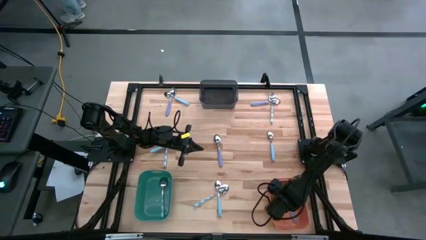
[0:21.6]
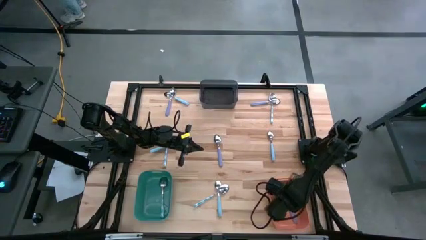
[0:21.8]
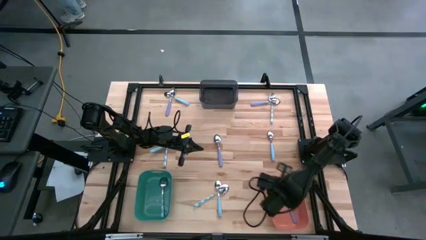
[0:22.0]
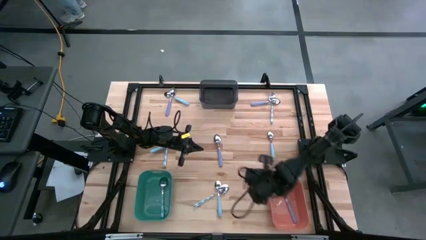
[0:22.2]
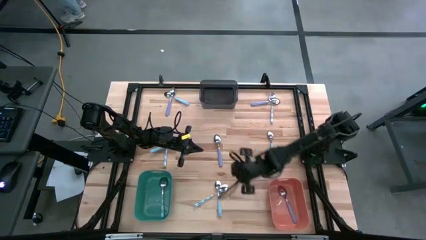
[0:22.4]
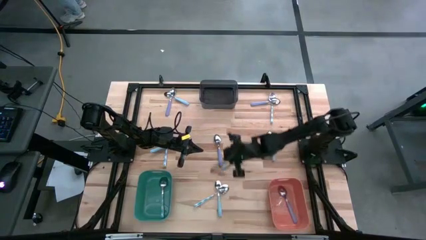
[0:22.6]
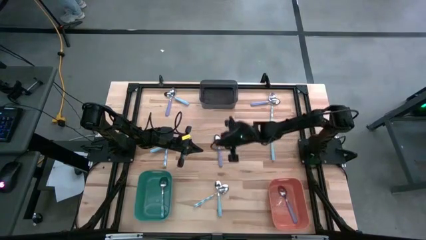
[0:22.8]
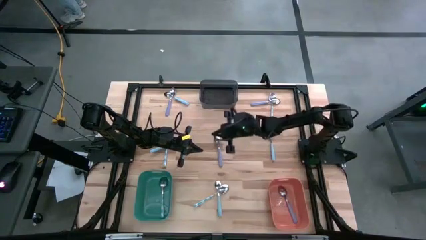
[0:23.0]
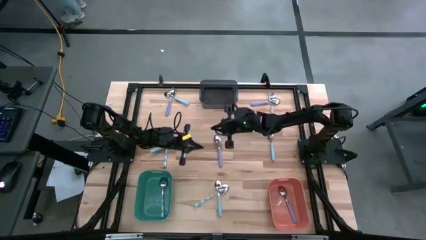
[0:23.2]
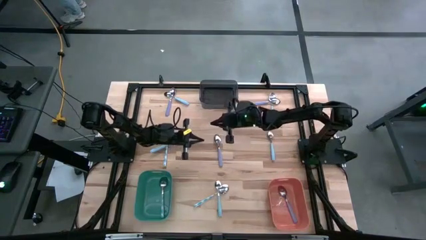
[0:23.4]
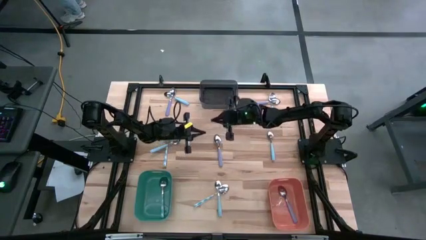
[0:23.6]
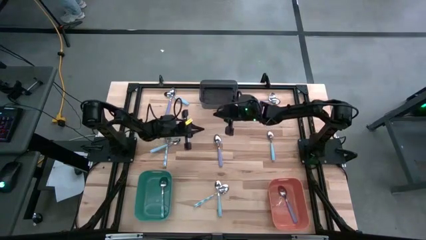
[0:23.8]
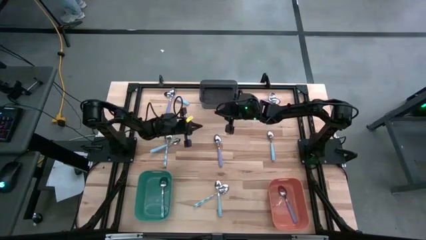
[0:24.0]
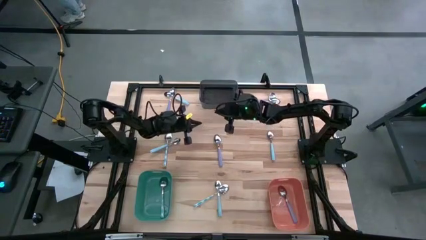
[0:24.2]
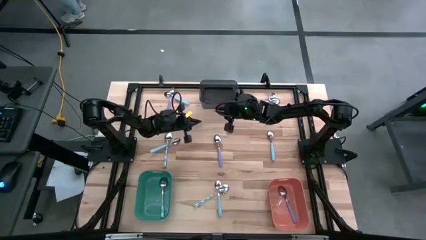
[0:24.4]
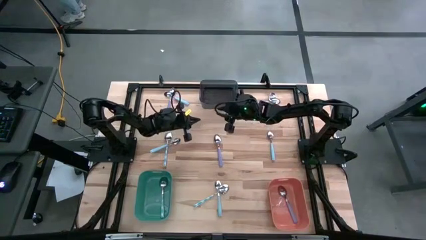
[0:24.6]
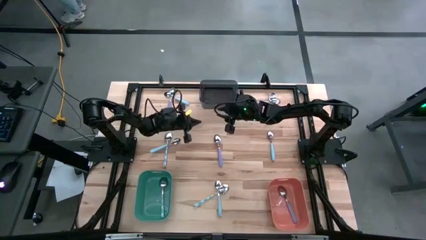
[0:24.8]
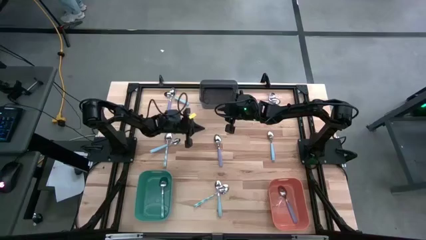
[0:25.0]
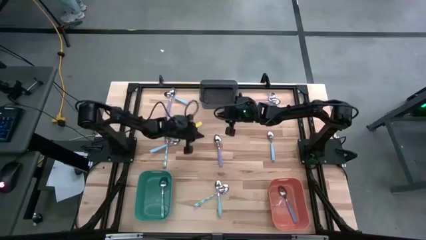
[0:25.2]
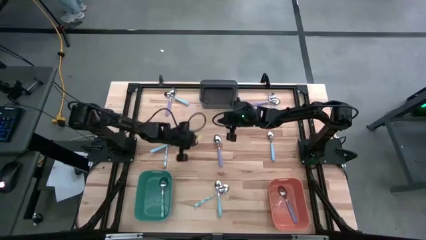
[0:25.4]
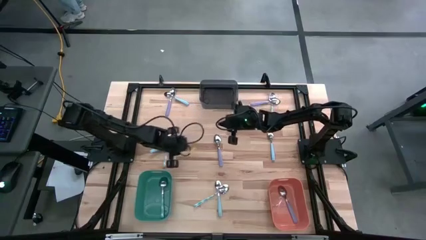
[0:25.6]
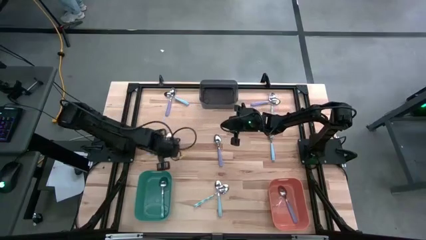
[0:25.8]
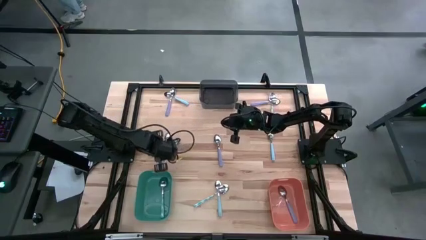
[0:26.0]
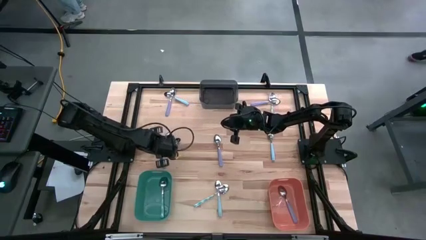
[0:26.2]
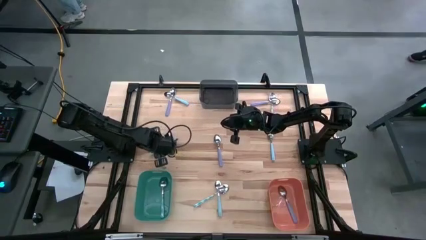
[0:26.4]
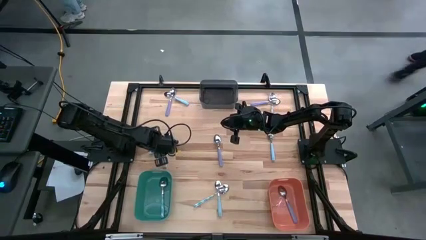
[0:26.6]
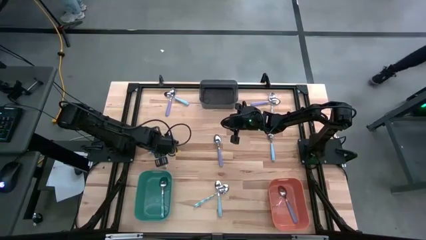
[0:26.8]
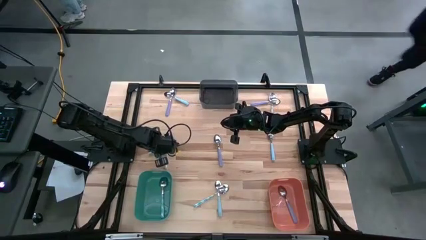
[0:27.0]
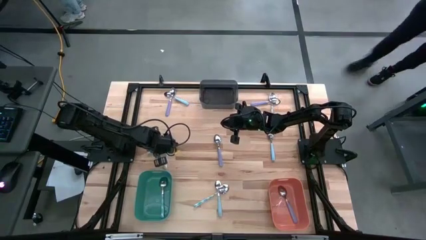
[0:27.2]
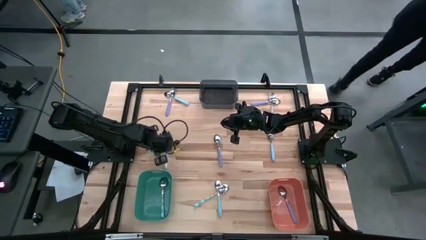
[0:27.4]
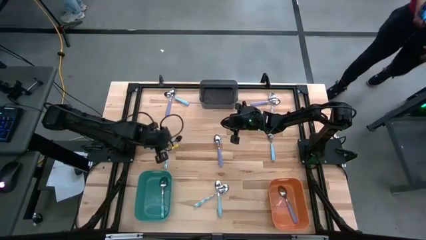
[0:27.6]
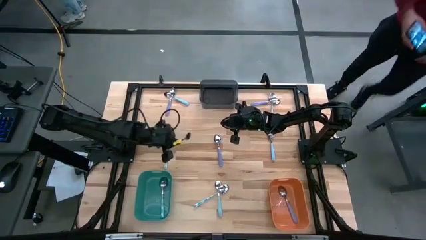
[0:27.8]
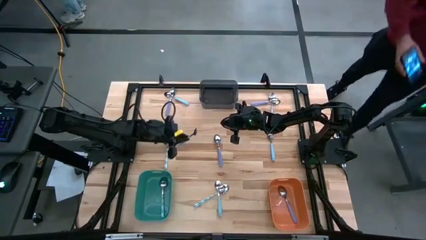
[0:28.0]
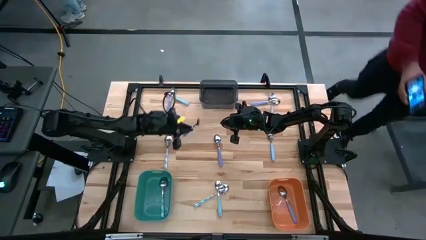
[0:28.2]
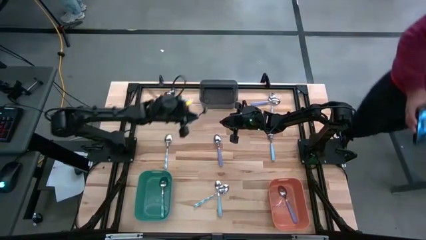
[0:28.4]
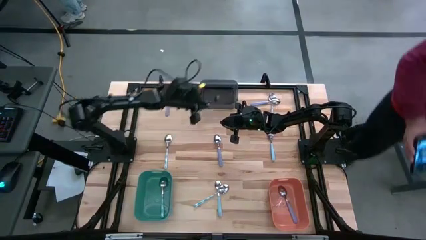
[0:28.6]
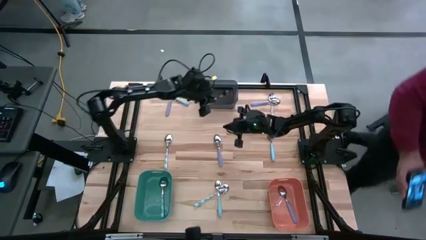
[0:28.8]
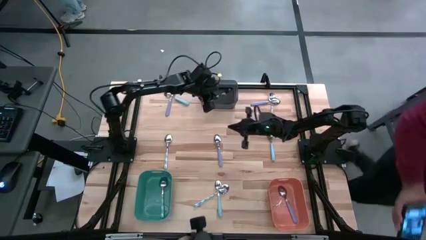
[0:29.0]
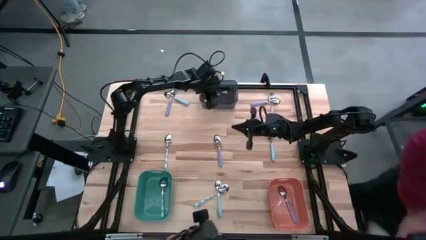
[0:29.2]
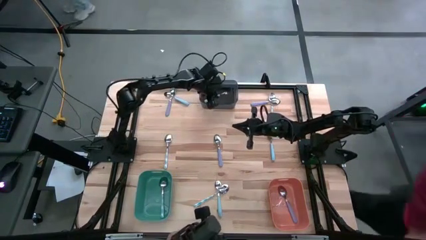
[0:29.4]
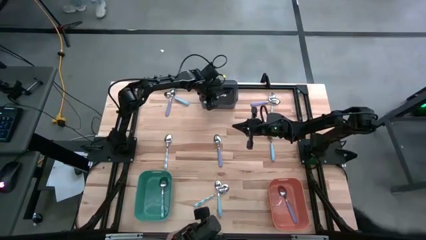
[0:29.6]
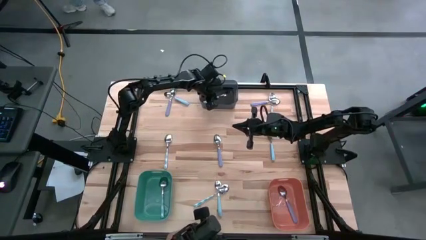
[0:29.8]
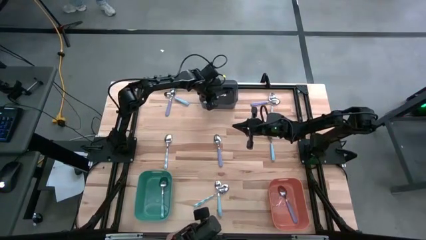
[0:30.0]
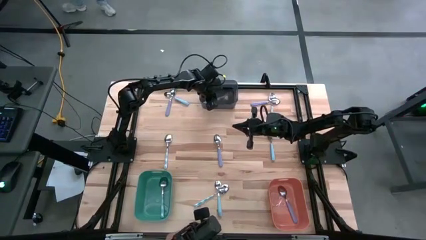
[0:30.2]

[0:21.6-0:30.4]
Task: Sort silverware by color (type)
Put the blue spoon into the black bin

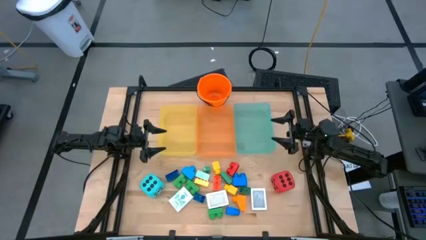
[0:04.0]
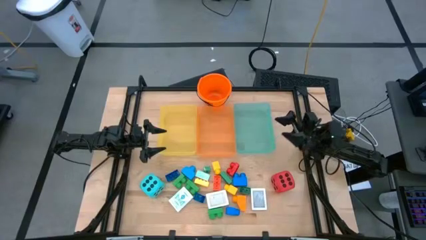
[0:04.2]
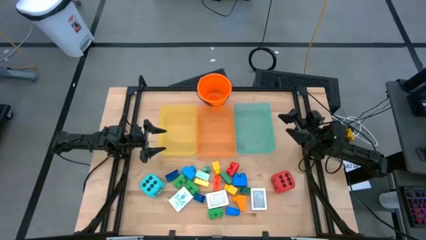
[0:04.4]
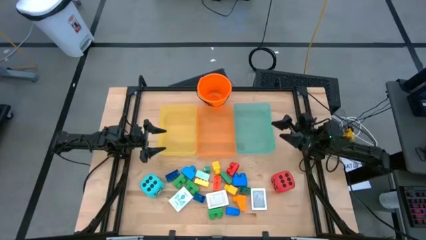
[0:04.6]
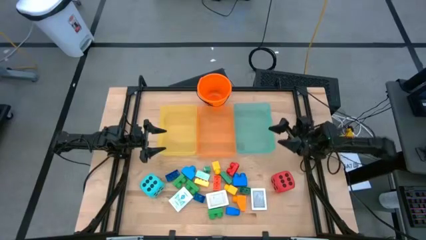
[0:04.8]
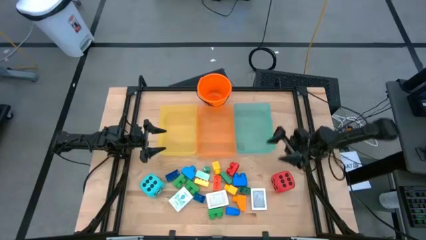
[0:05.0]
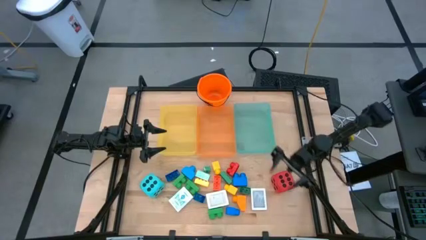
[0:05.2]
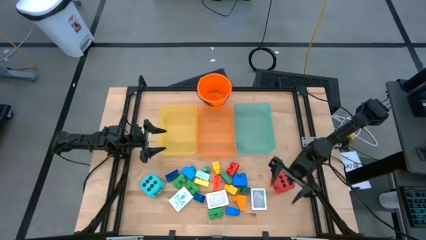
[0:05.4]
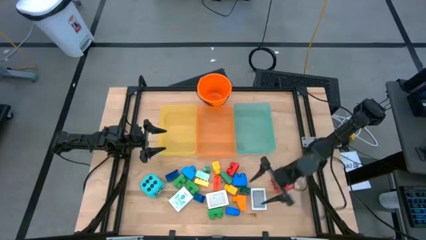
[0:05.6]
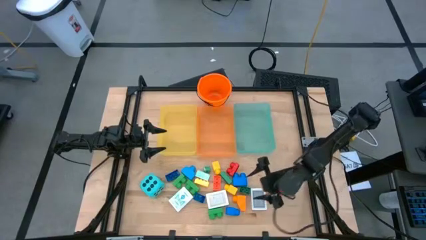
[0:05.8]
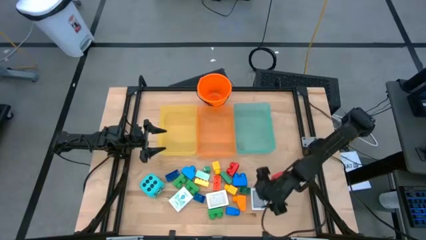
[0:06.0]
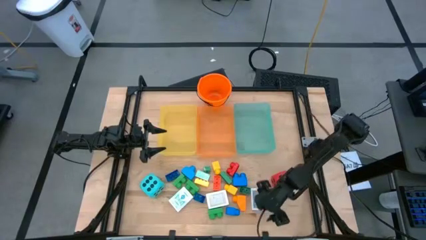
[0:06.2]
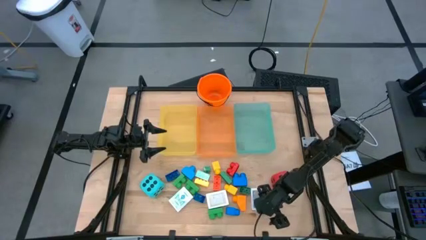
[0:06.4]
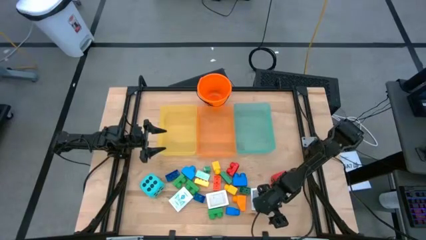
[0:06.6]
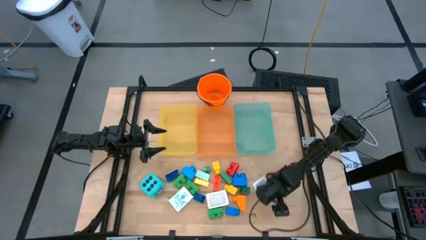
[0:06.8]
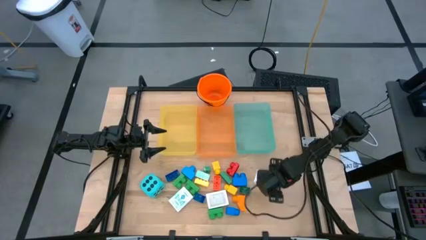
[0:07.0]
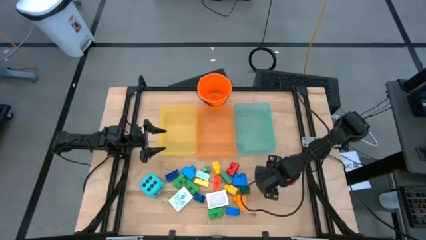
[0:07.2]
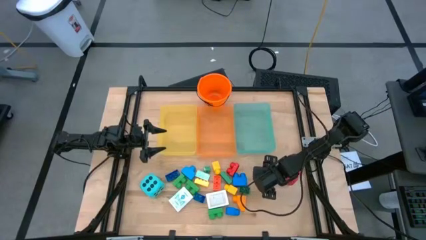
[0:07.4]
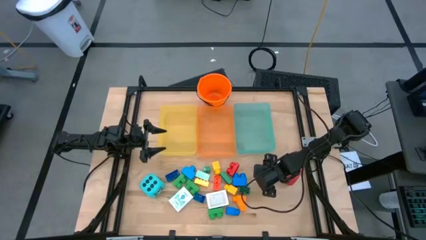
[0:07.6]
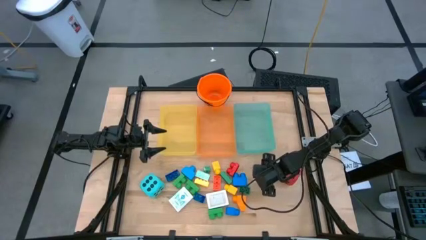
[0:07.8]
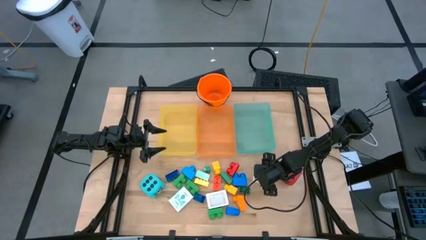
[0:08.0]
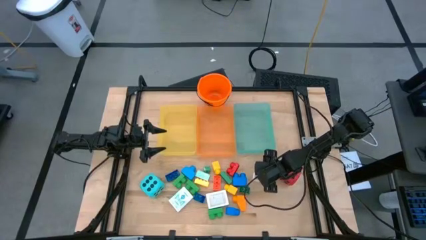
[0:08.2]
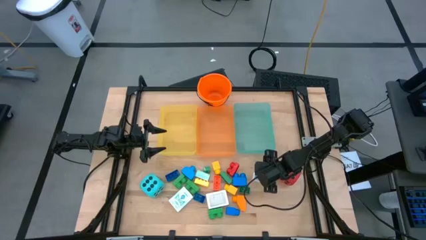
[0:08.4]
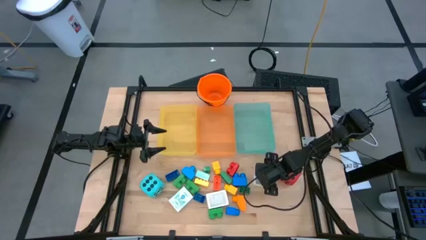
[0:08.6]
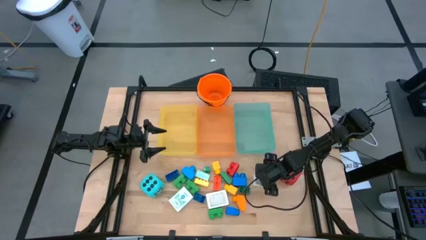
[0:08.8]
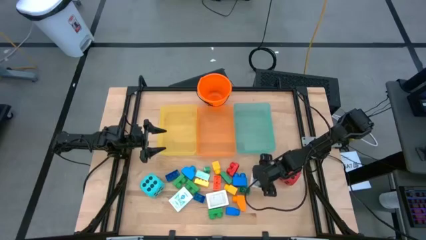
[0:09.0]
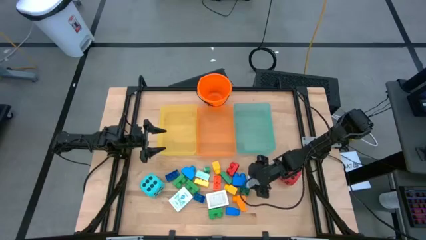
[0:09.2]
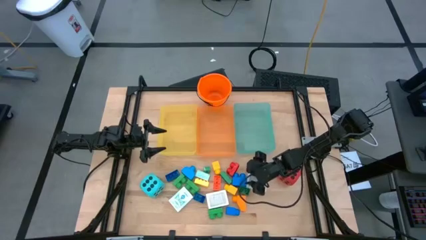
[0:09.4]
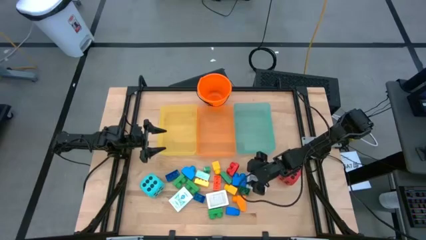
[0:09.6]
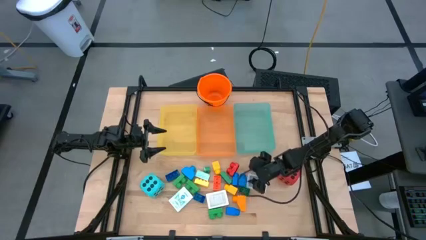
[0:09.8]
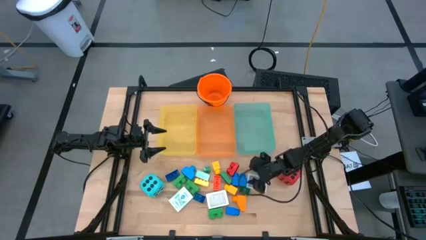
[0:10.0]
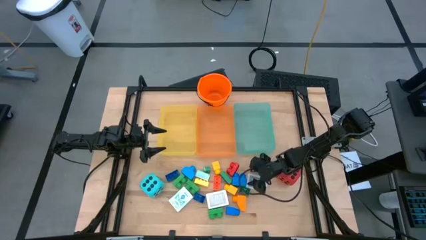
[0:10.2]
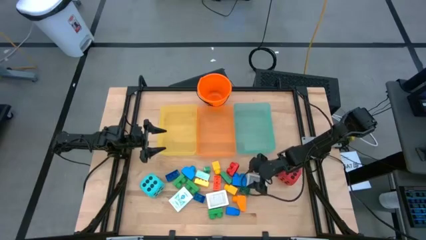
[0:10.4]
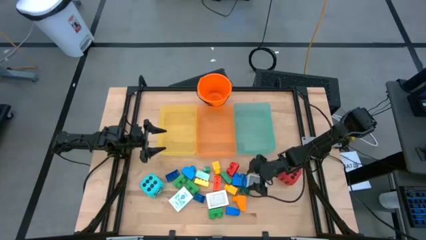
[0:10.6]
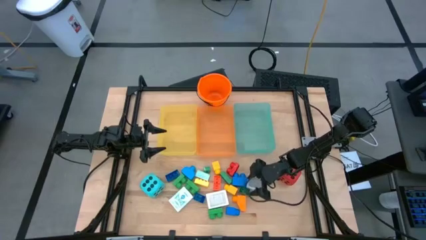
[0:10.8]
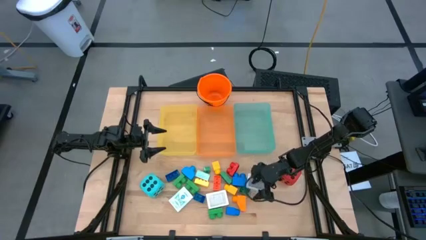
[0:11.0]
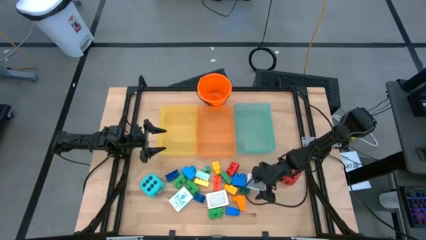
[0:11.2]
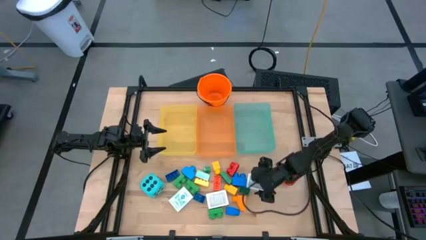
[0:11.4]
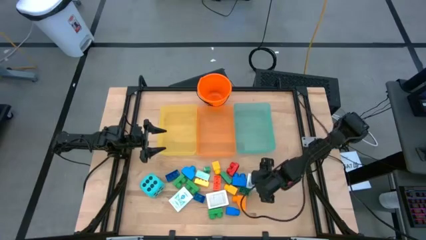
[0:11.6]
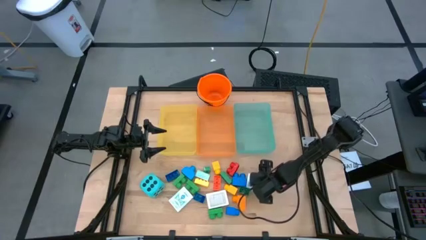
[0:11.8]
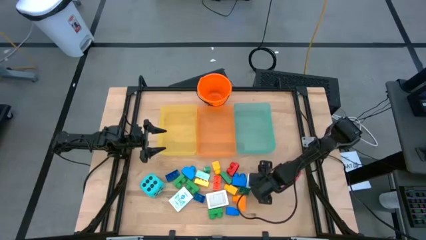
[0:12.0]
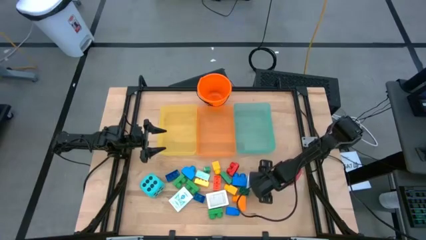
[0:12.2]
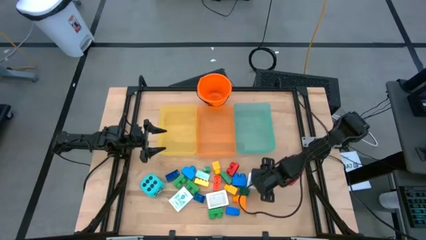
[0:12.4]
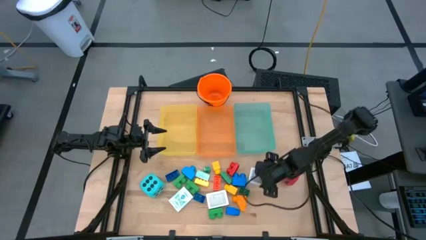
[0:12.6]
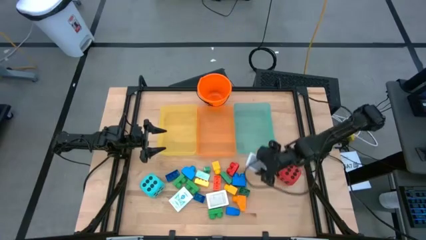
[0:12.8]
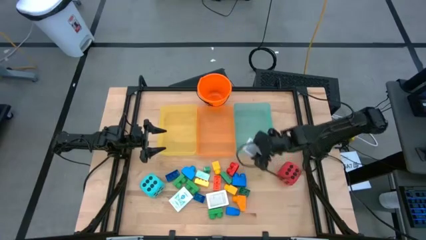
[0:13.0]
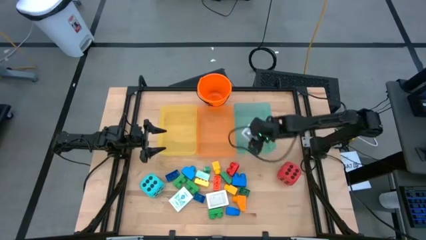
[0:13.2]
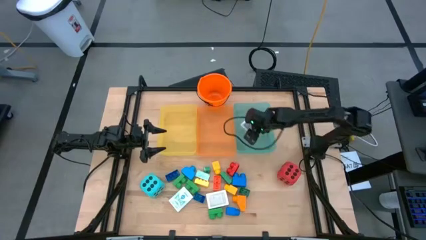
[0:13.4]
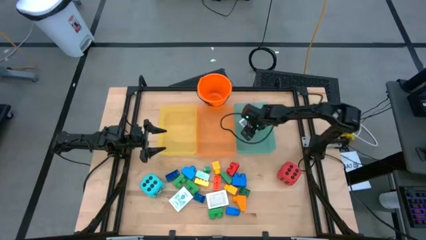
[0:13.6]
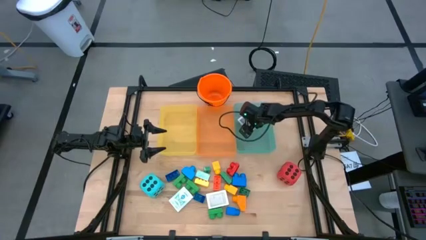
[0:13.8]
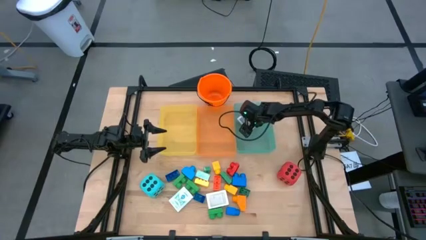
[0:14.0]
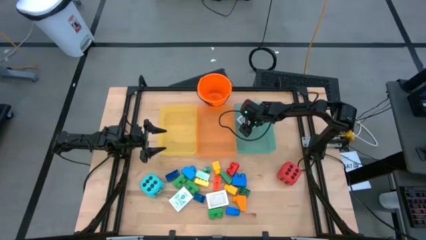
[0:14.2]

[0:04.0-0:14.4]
Task: Pick & Place Toys
Put the black deck of cards into the blue bin
